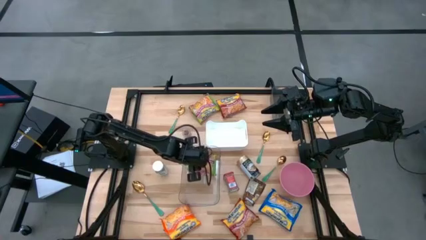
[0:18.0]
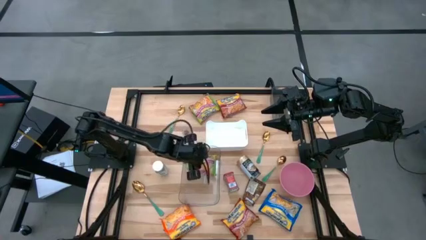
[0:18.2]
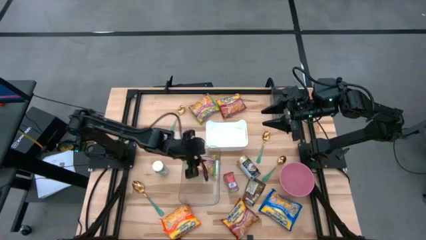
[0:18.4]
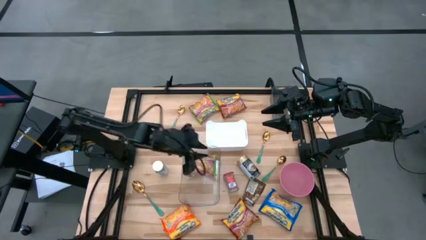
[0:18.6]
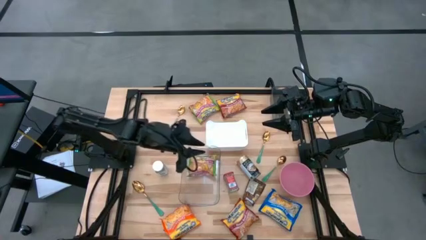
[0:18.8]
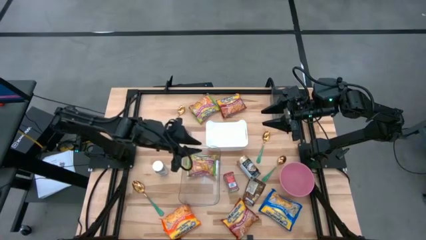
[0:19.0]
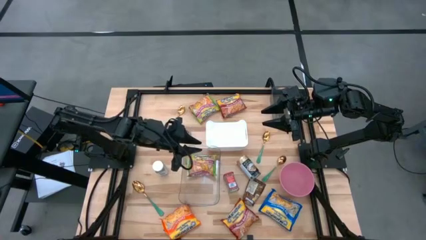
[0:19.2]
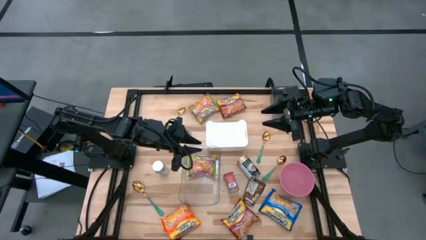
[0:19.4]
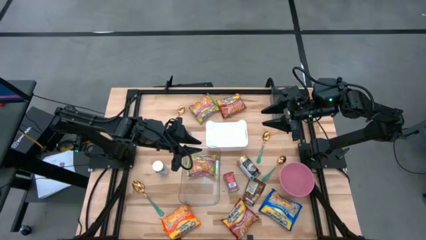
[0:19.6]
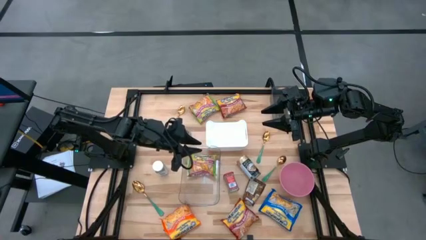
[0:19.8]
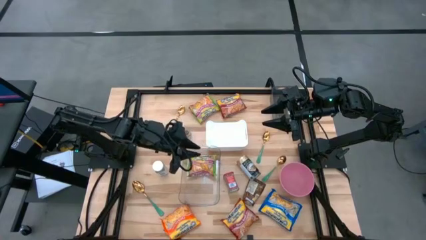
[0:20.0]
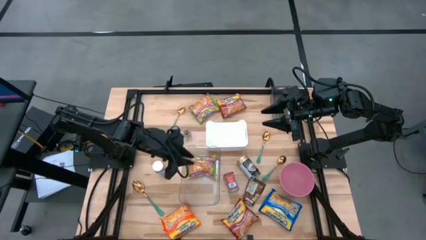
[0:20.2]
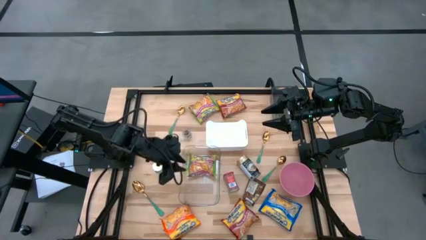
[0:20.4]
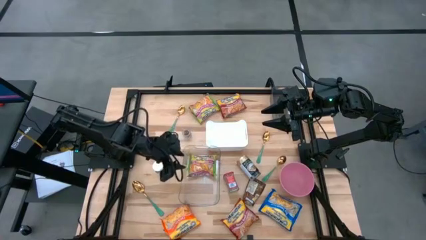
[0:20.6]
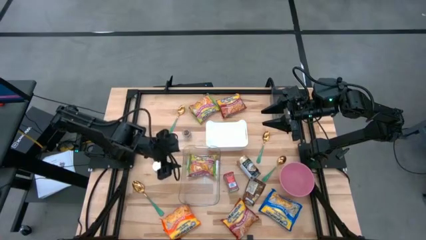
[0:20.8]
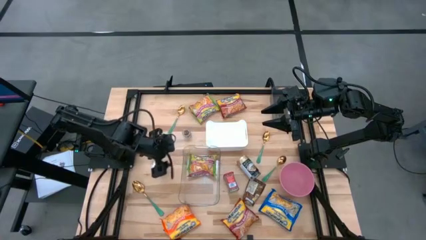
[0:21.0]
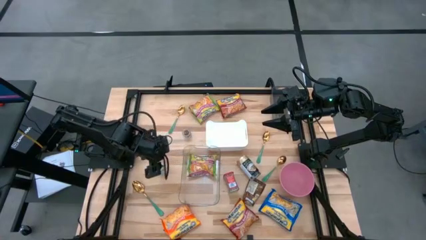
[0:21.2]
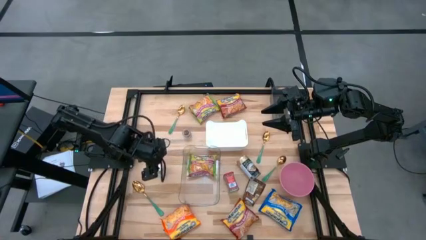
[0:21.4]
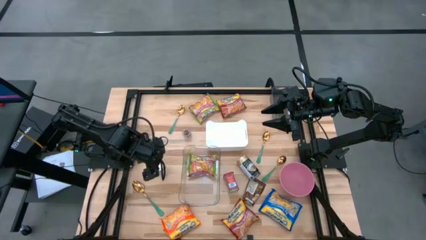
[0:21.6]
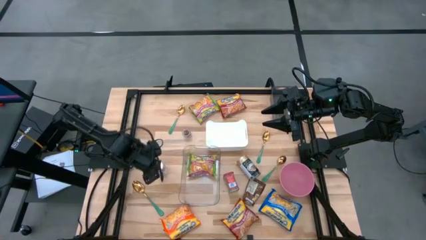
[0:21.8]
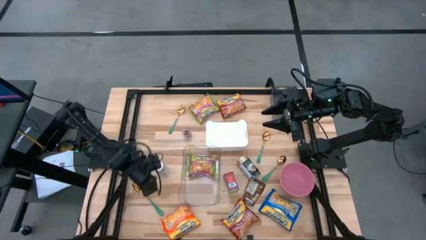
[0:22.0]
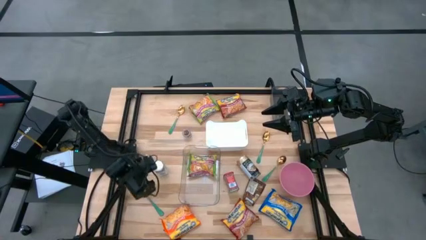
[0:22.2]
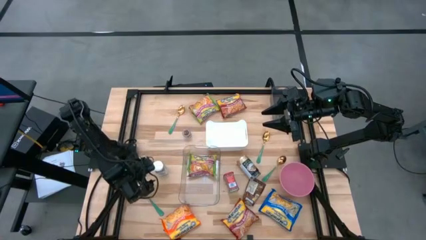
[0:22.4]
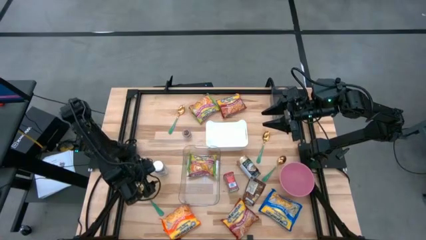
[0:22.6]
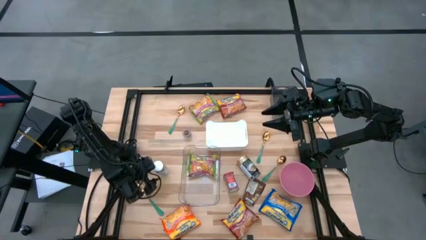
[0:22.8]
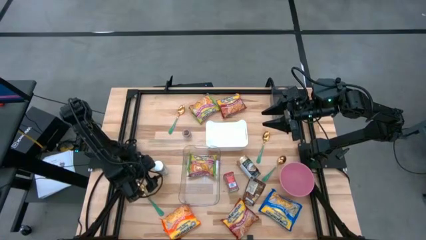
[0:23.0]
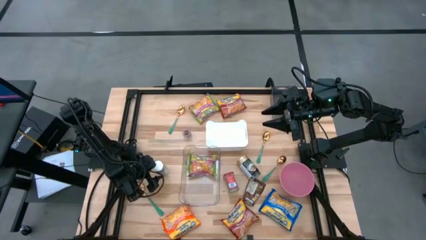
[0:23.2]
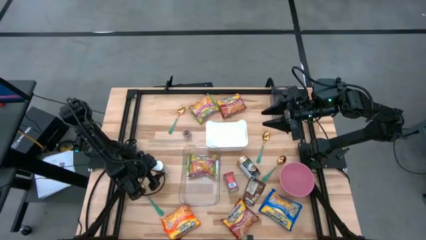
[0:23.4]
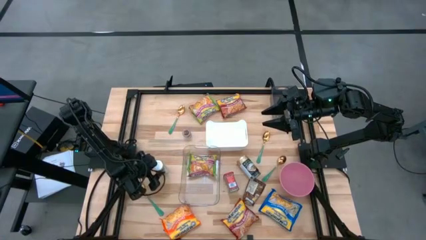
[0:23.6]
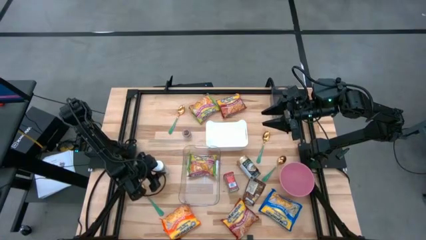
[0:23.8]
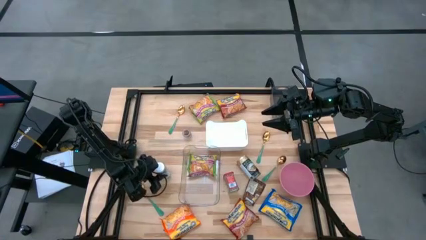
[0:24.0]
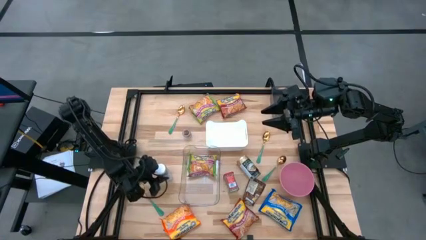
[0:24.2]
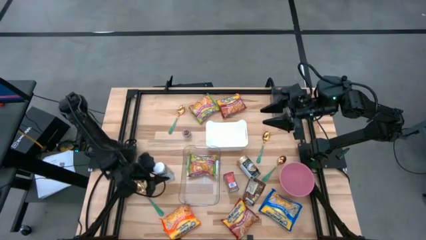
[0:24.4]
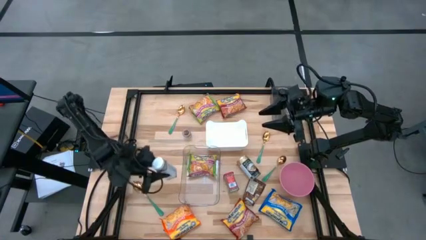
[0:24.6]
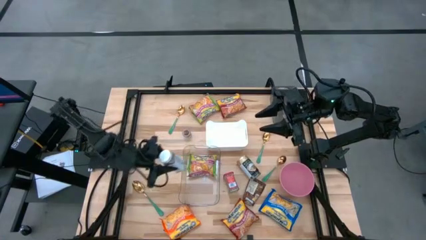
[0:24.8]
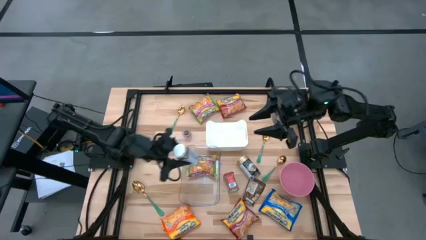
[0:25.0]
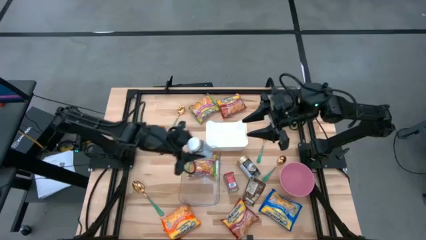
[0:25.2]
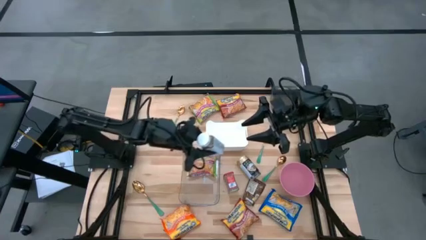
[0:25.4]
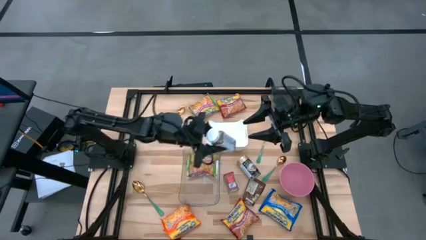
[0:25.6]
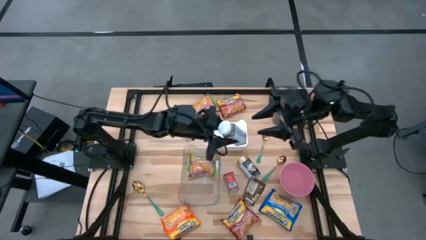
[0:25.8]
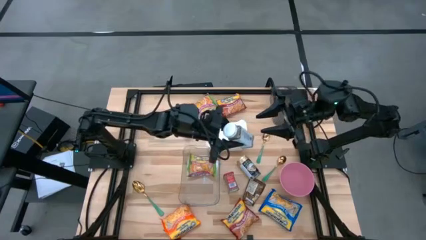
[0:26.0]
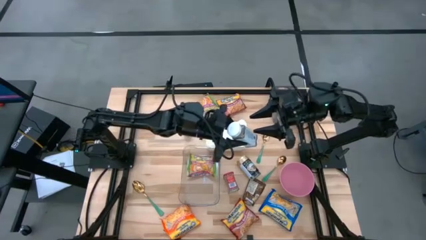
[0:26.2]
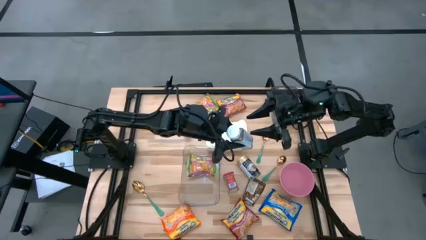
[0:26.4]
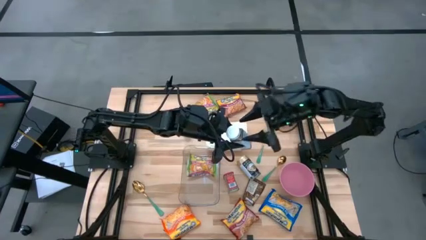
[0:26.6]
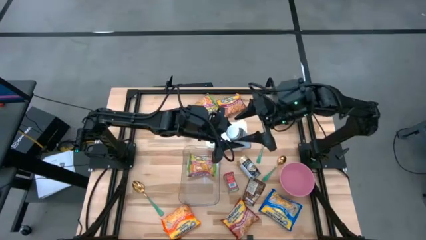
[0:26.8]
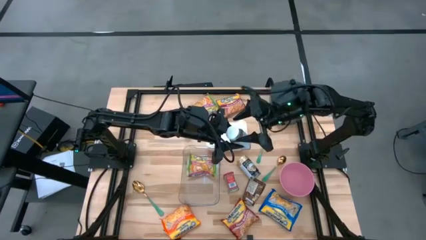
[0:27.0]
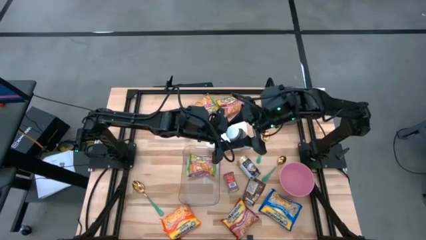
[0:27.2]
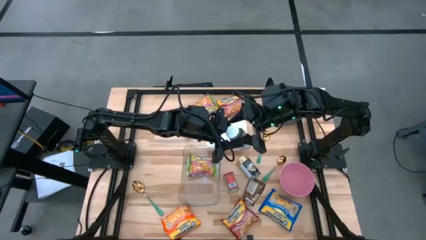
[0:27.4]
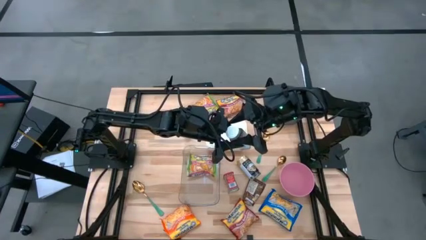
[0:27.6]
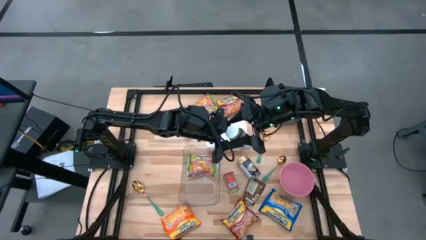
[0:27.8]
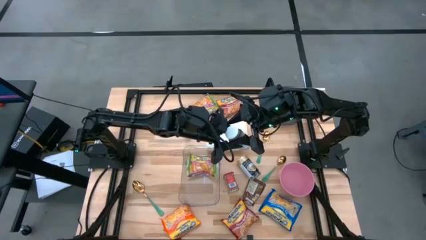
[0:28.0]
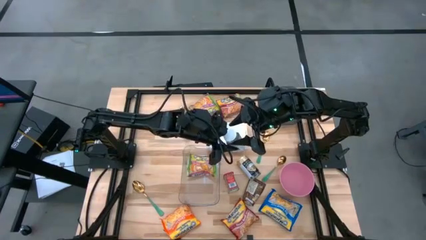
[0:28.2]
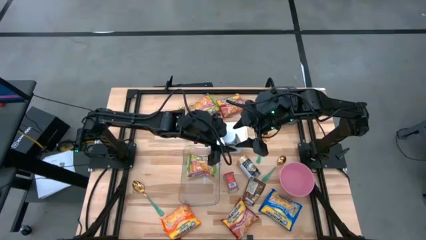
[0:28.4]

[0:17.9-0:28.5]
Task: Pick & Place Food Item
Put the white spice bottle into the black bin
